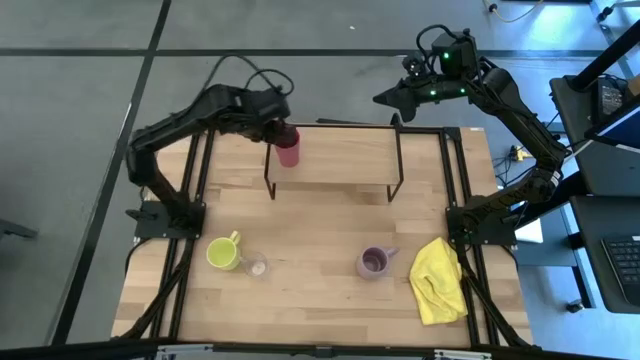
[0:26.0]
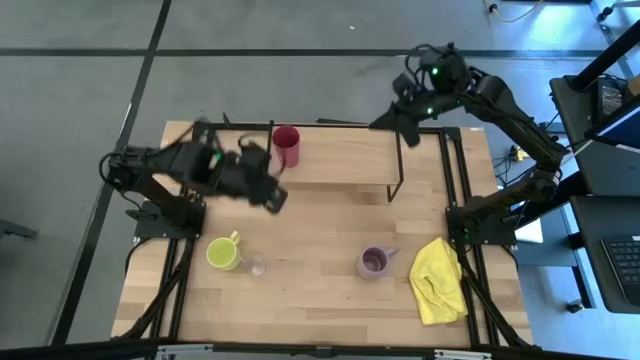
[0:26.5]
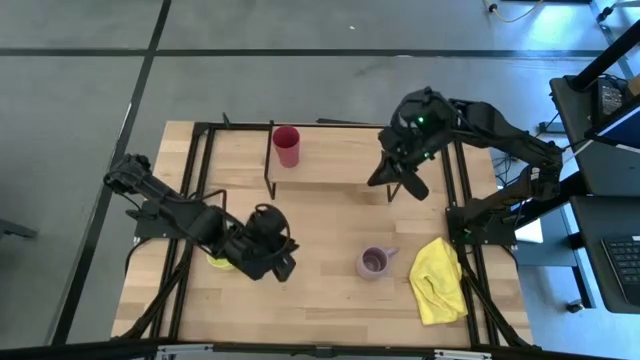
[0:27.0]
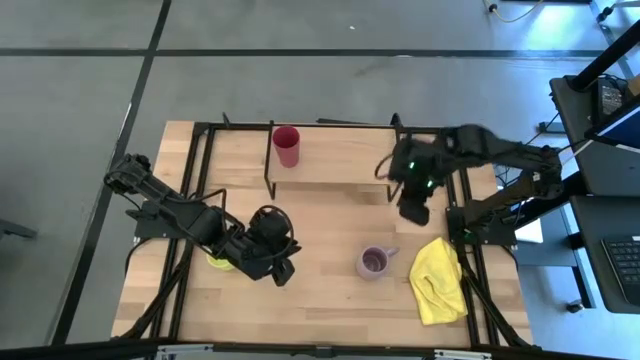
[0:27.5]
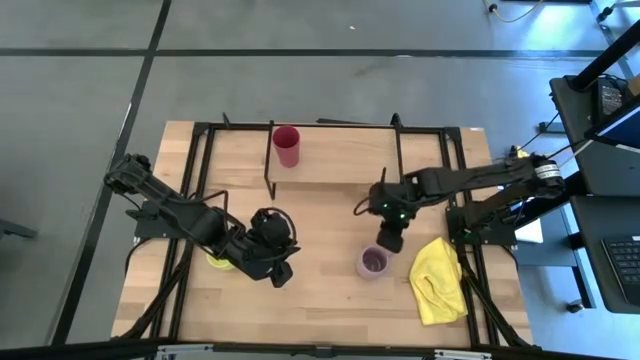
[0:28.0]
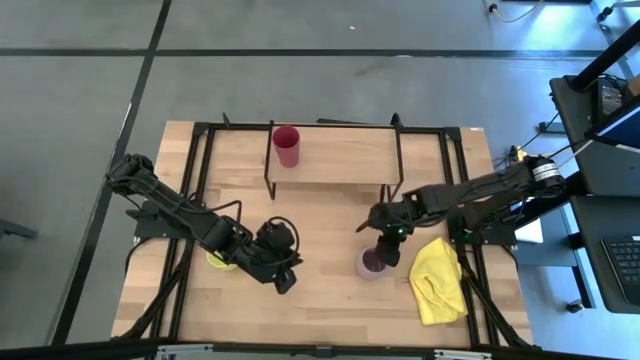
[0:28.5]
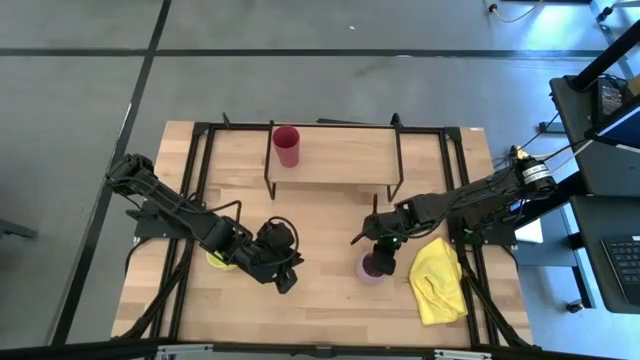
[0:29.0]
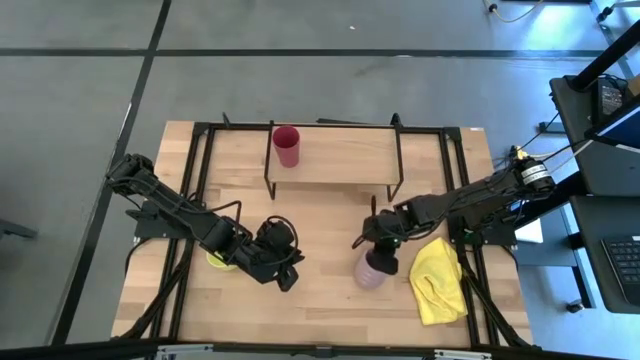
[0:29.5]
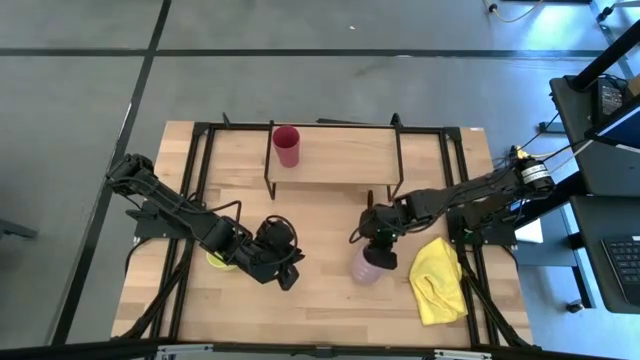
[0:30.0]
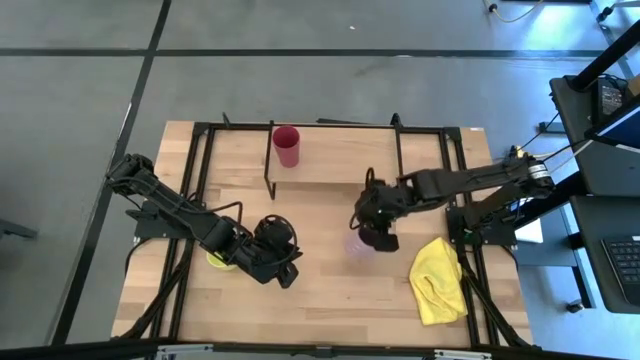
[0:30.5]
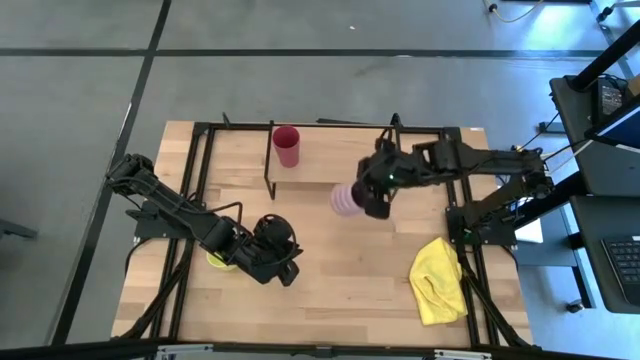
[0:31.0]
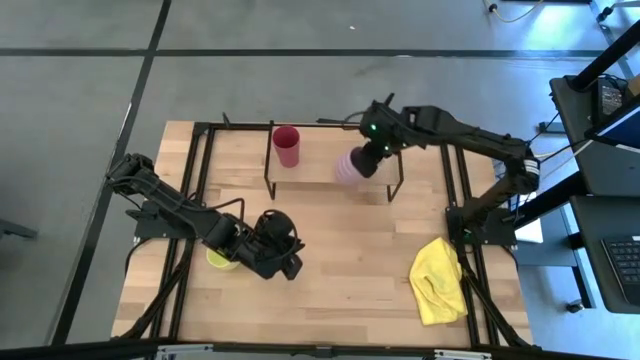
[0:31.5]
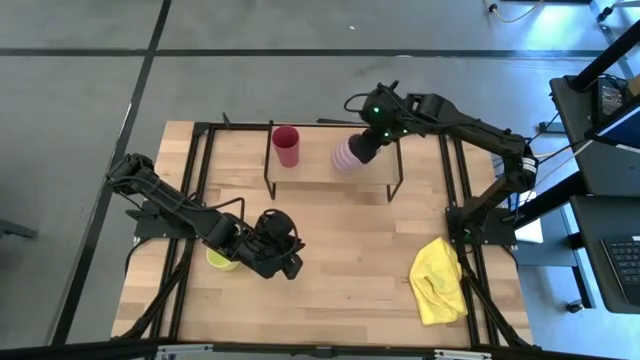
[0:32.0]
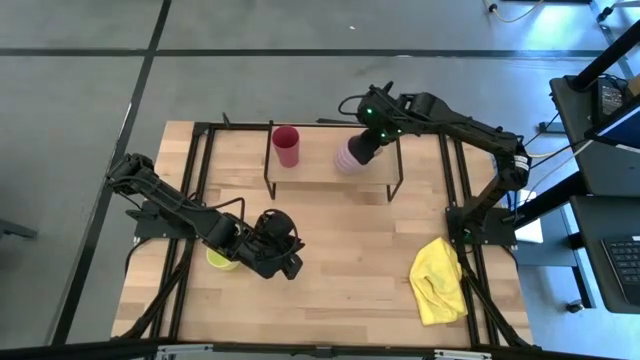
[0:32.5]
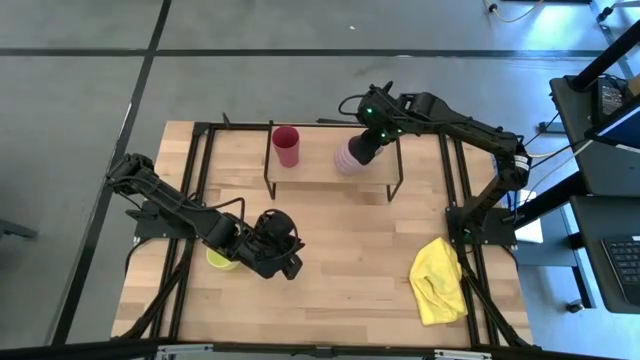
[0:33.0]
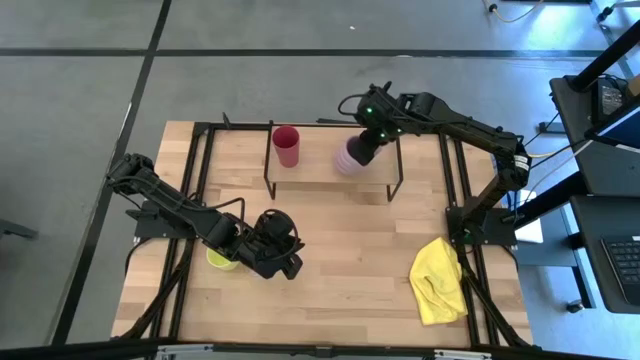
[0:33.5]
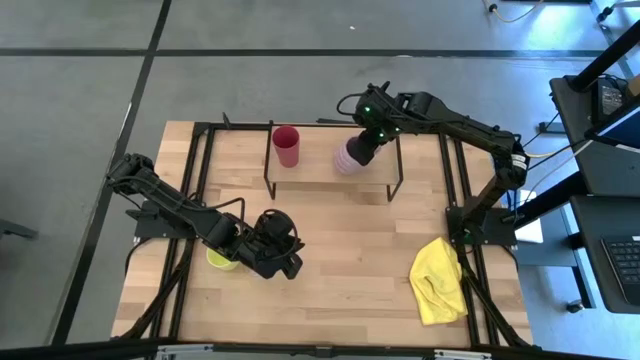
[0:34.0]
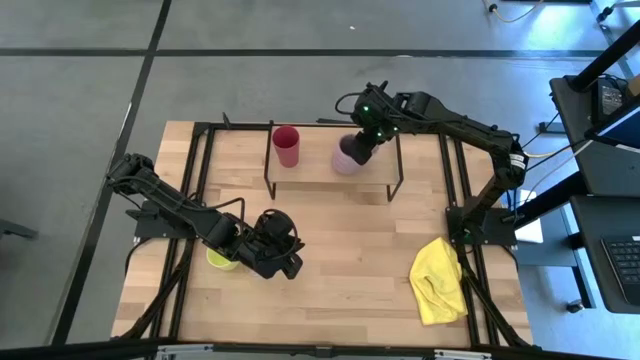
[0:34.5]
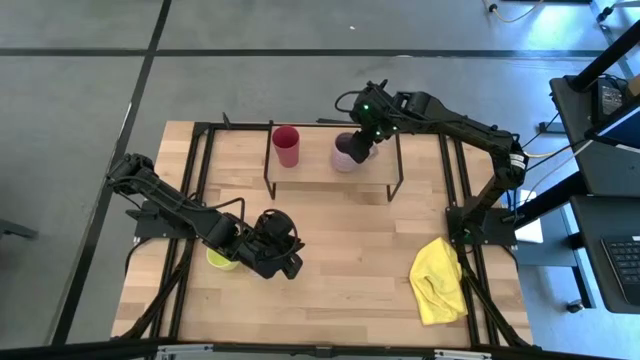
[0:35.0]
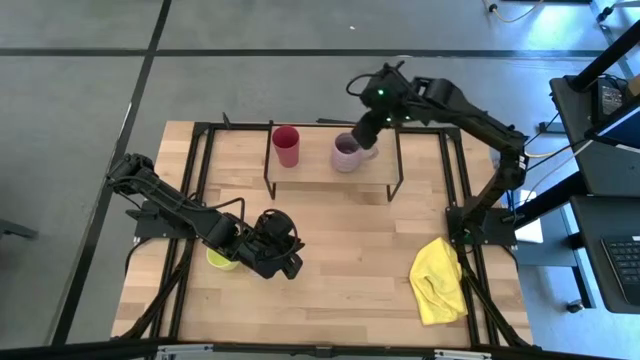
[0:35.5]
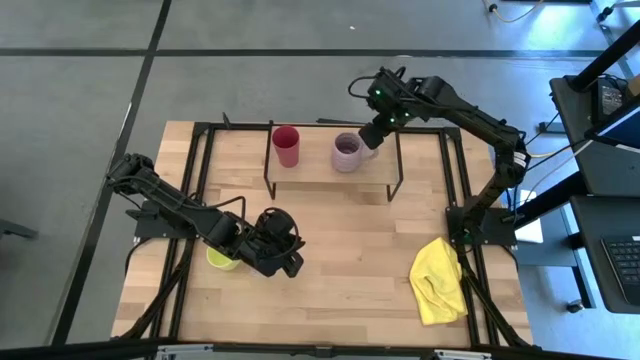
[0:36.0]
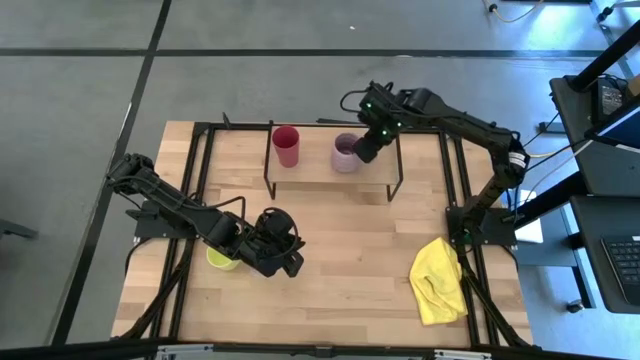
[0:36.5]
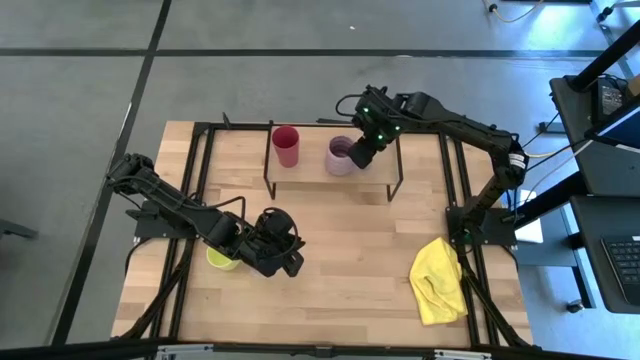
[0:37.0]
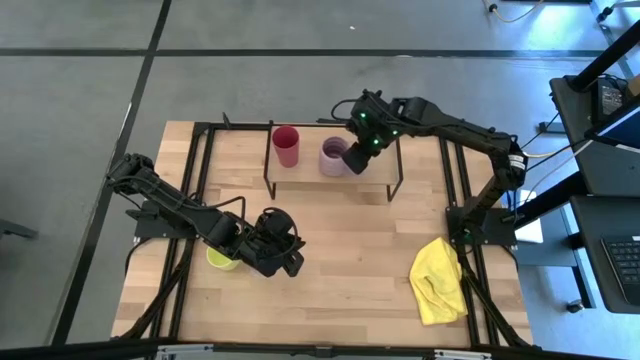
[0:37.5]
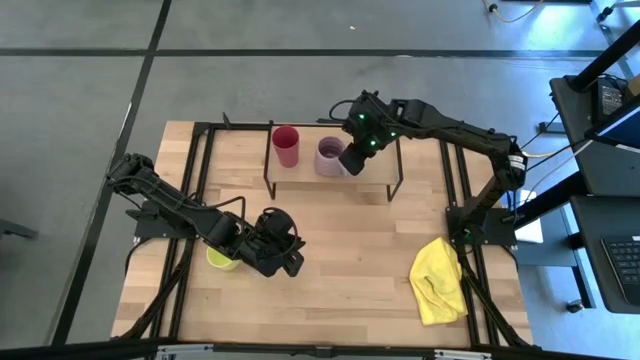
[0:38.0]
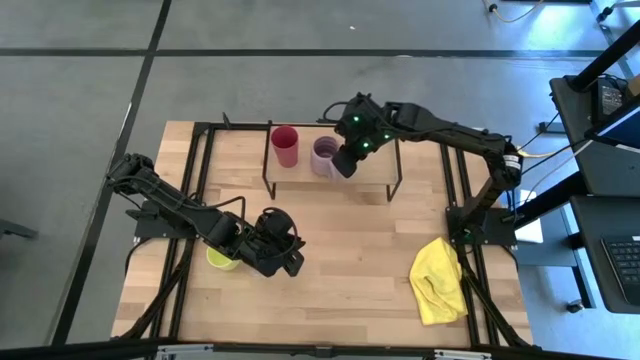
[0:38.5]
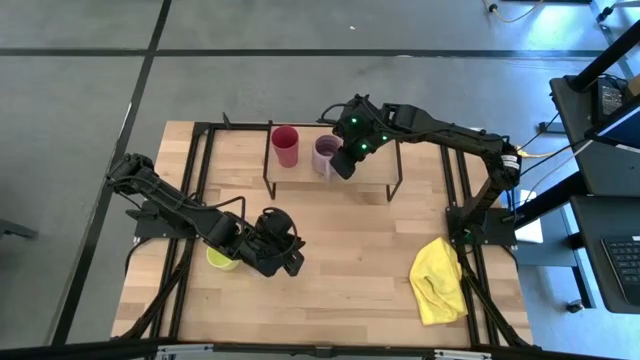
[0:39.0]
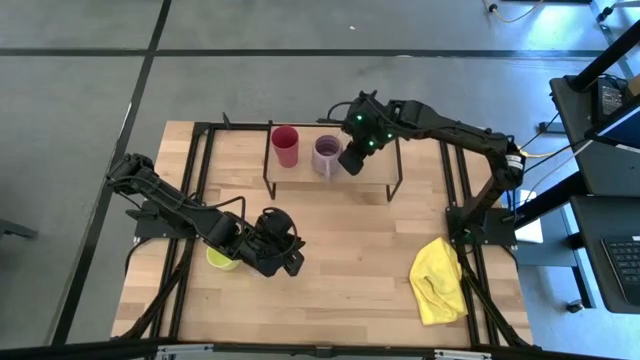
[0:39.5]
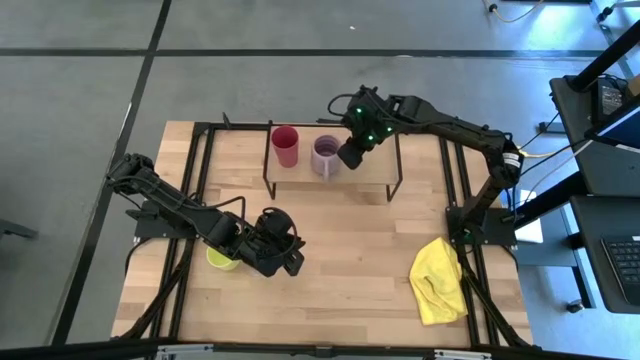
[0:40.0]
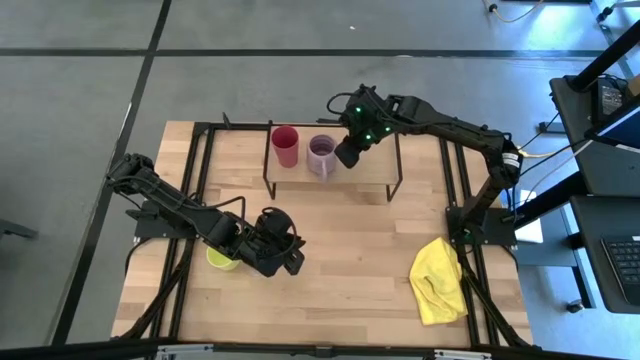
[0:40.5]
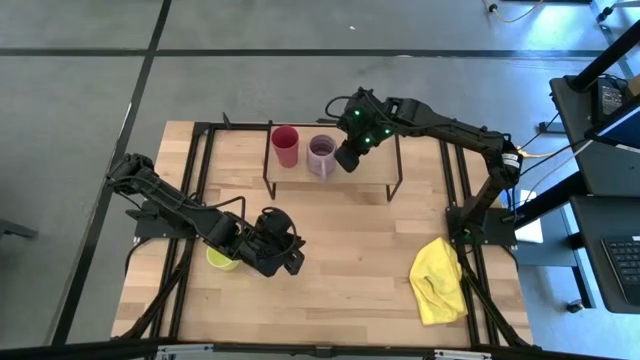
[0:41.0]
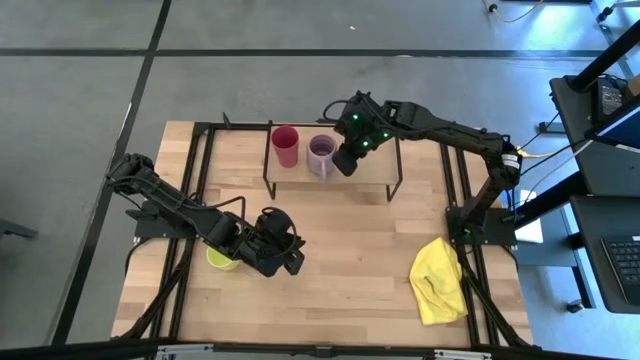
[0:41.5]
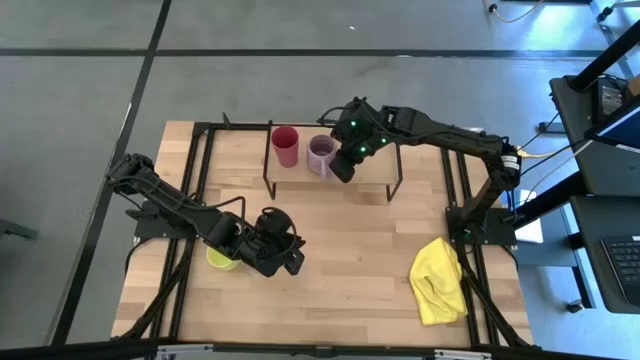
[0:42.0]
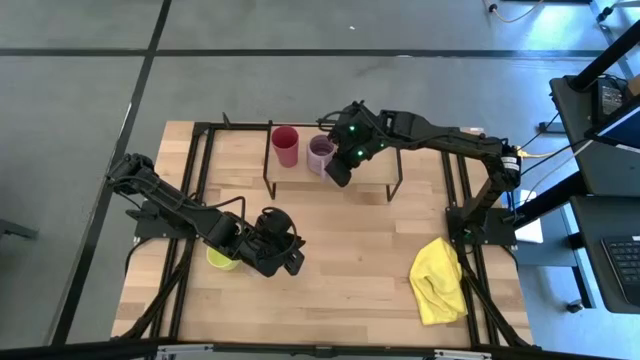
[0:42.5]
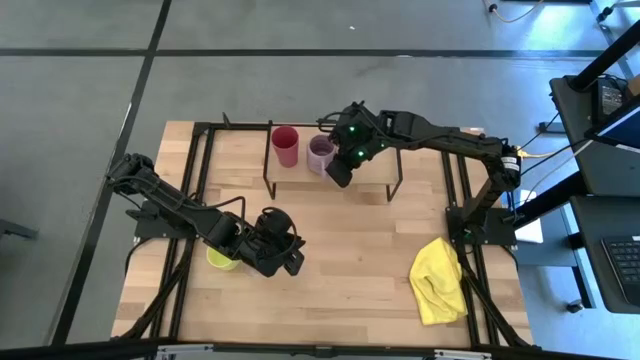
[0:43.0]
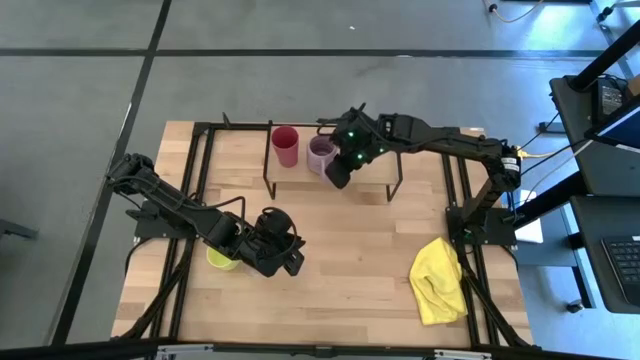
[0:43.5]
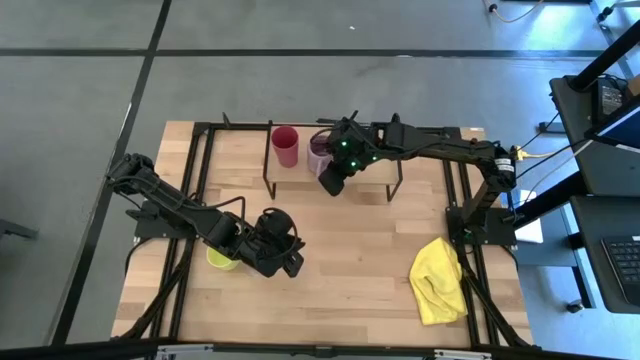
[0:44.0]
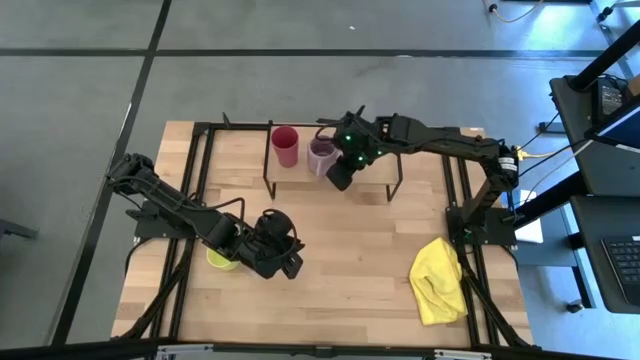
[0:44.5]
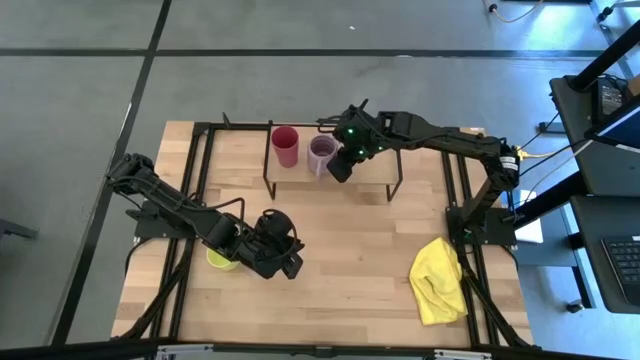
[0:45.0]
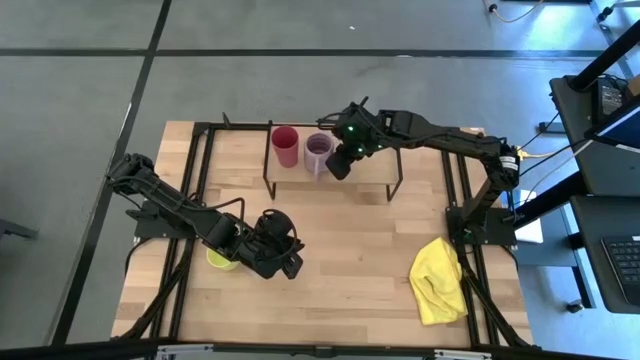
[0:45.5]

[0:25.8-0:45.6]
Task: Stack small to large cups/mugs on shelf
Put the violet mug on the shelf

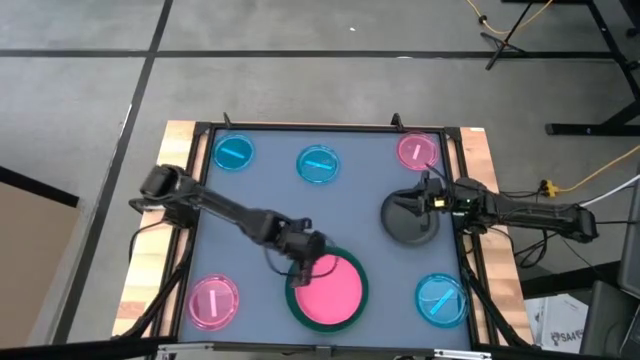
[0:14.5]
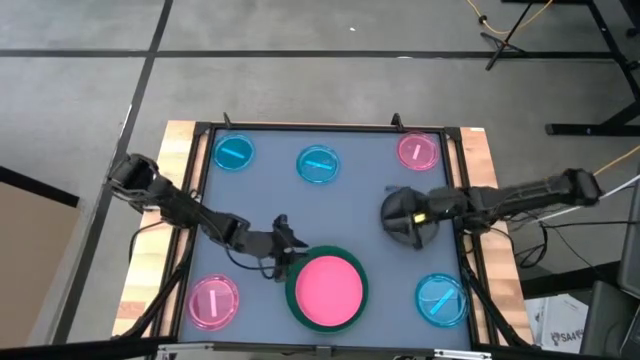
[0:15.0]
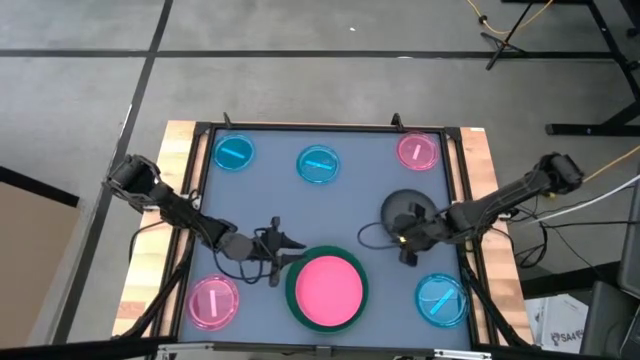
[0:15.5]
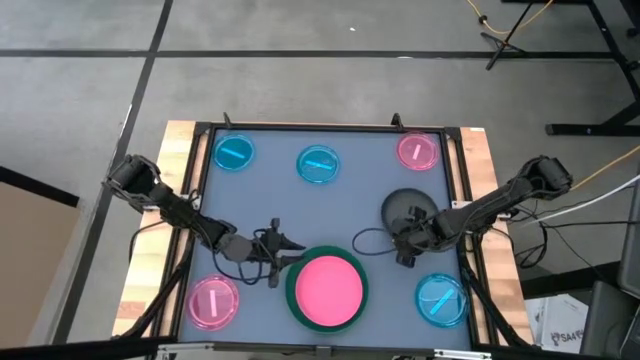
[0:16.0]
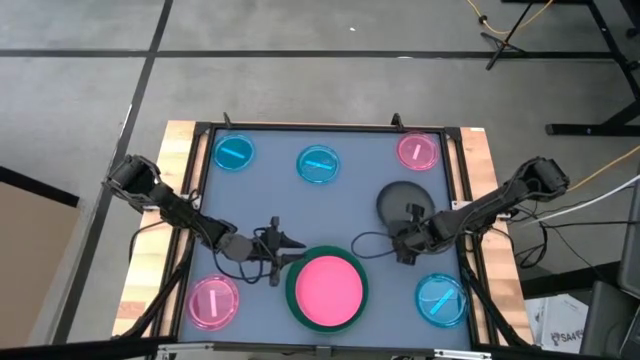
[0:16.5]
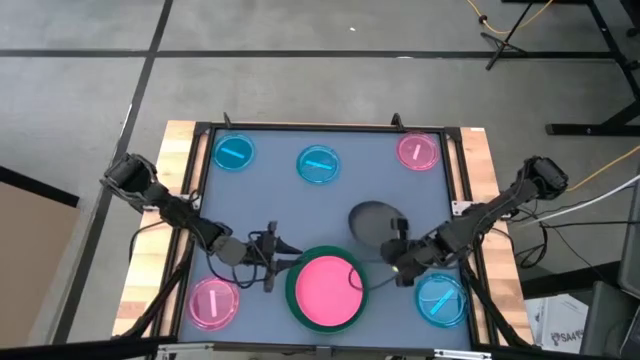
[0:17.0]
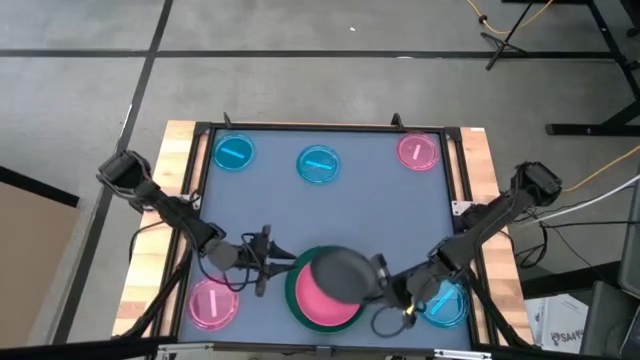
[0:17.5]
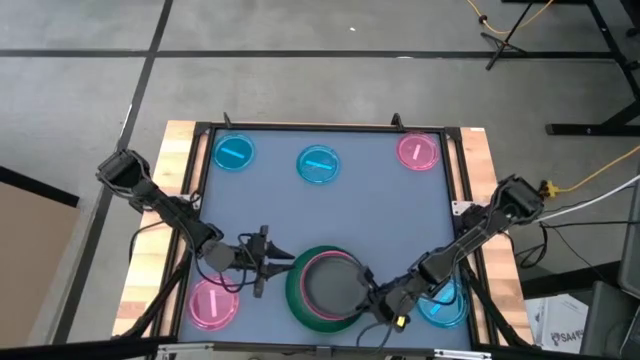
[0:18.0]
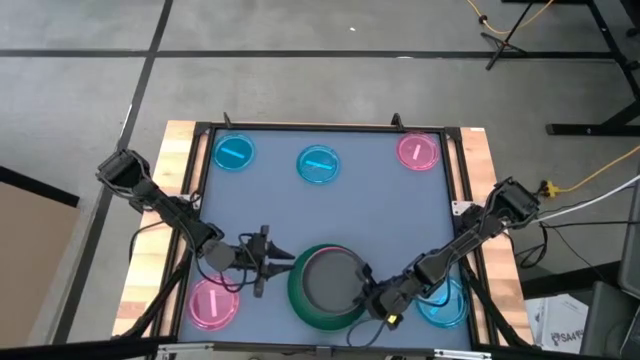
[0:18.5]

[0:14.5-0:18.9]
Task: Stack plastic plates
Stack the black plate on top of the pink plate
